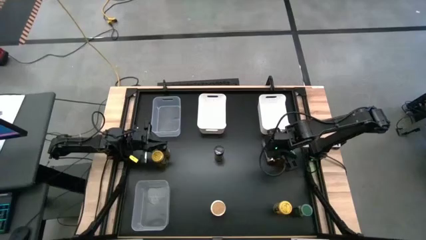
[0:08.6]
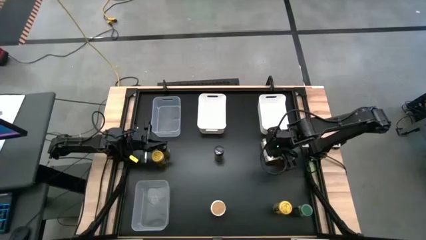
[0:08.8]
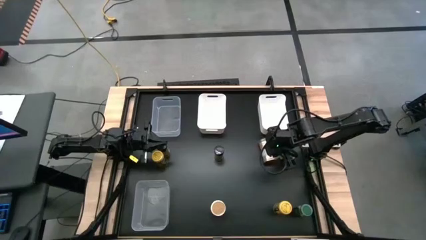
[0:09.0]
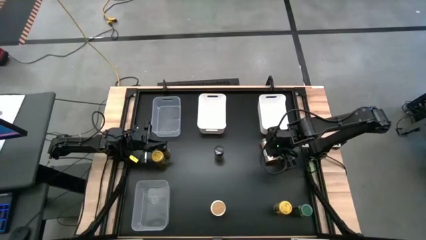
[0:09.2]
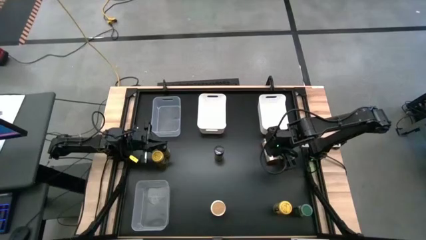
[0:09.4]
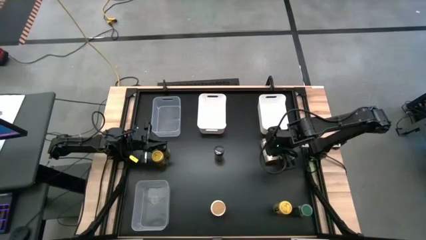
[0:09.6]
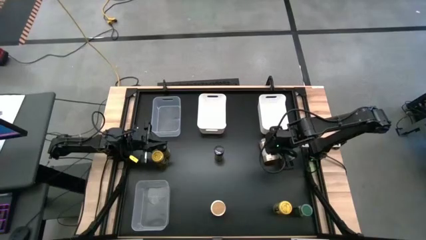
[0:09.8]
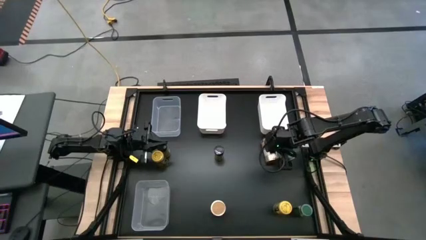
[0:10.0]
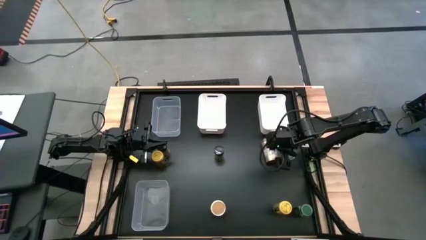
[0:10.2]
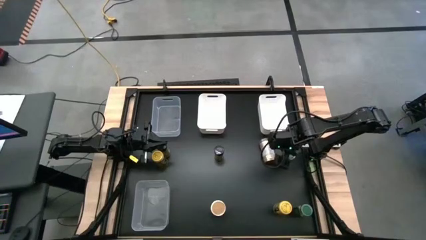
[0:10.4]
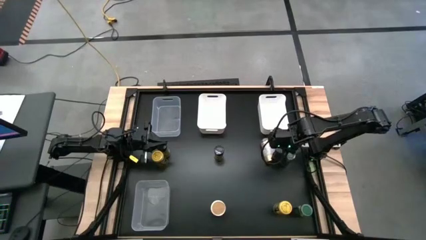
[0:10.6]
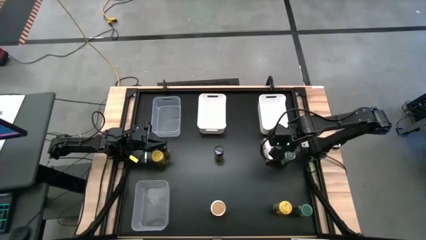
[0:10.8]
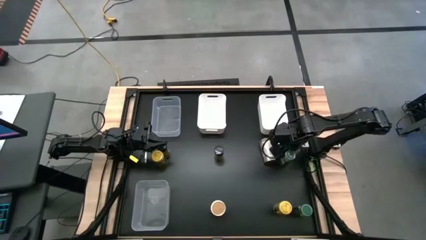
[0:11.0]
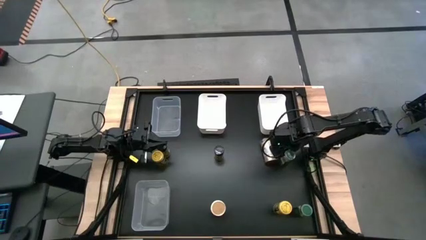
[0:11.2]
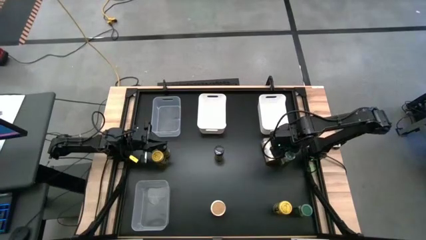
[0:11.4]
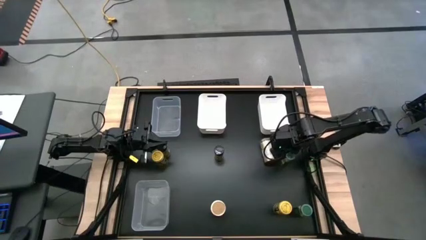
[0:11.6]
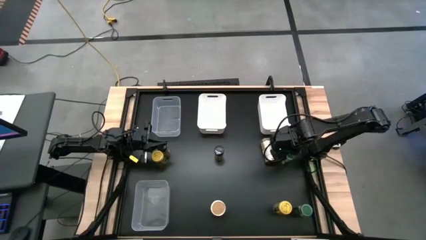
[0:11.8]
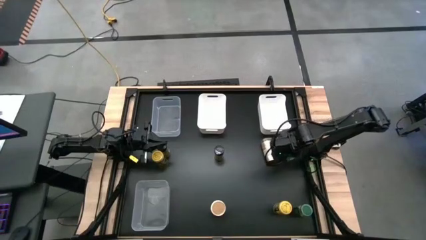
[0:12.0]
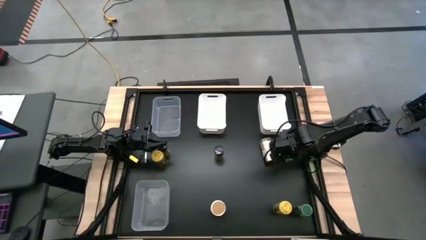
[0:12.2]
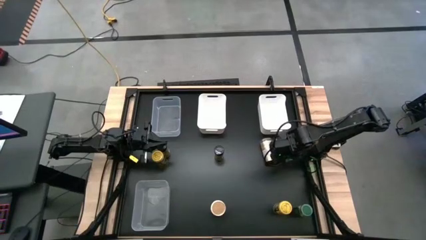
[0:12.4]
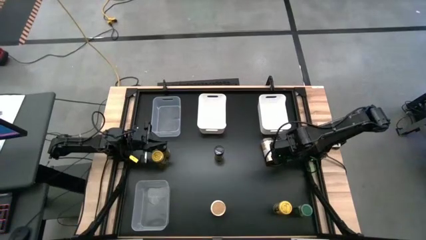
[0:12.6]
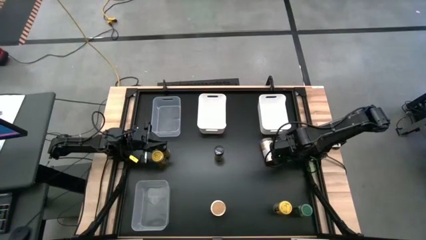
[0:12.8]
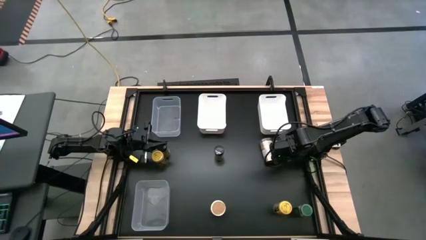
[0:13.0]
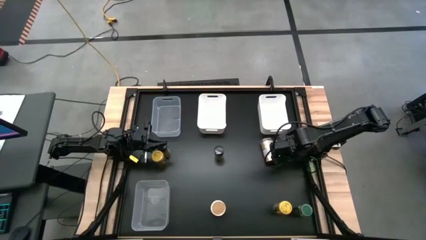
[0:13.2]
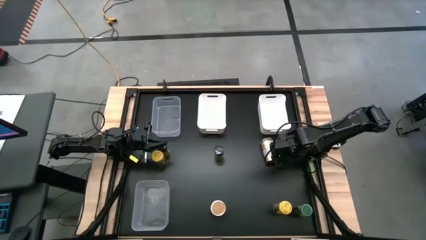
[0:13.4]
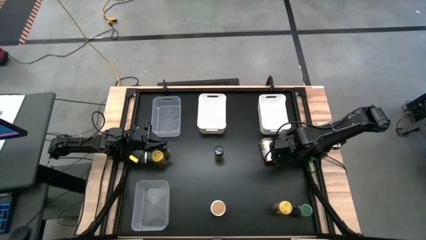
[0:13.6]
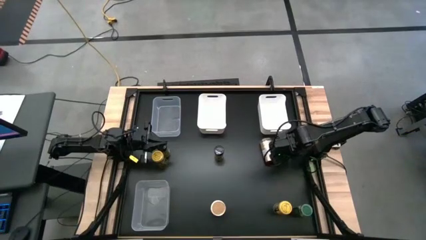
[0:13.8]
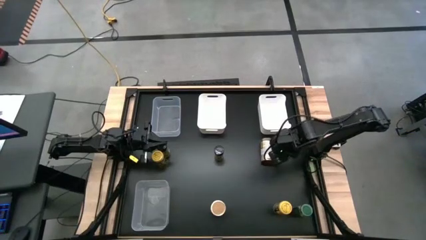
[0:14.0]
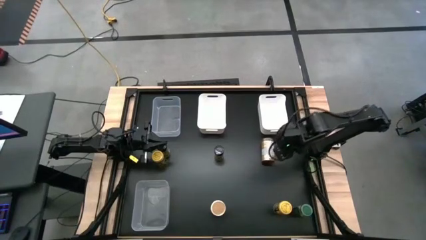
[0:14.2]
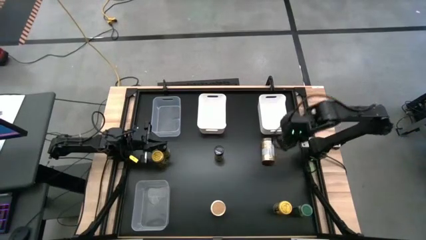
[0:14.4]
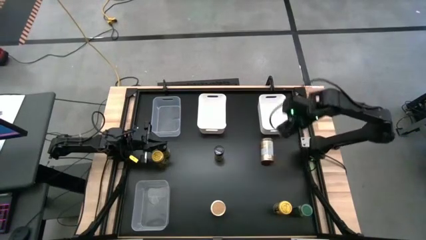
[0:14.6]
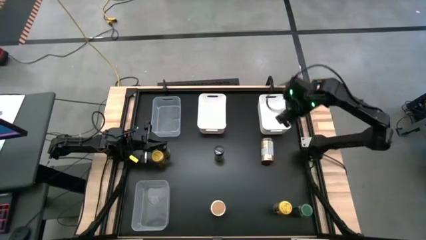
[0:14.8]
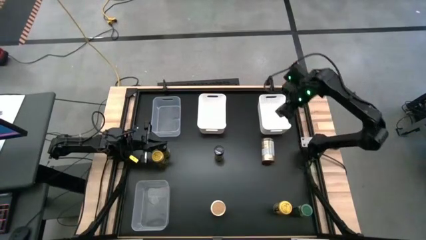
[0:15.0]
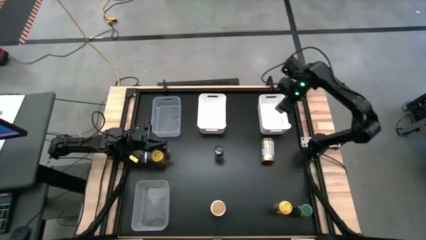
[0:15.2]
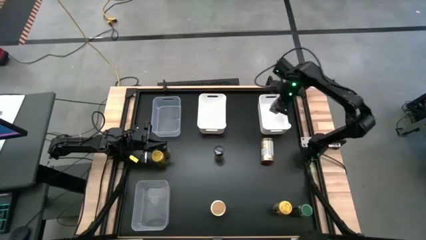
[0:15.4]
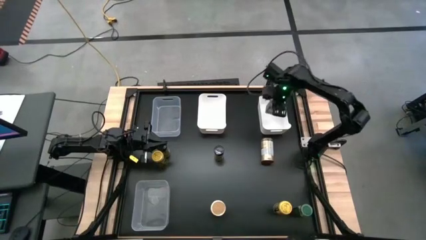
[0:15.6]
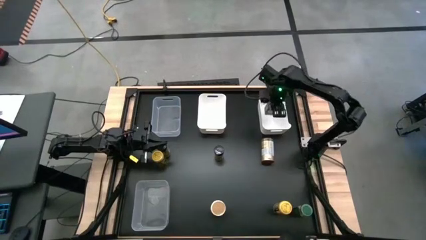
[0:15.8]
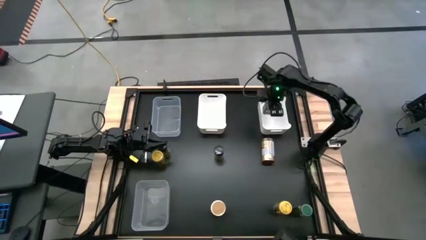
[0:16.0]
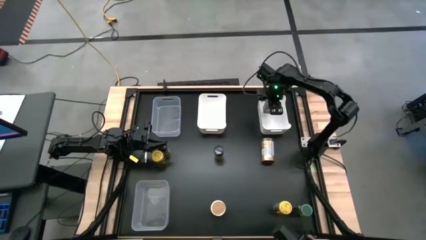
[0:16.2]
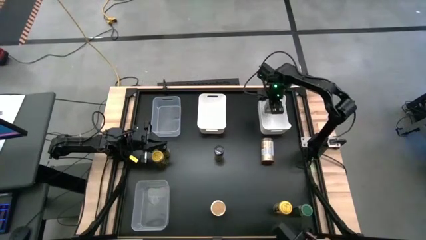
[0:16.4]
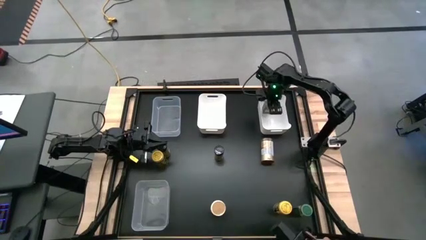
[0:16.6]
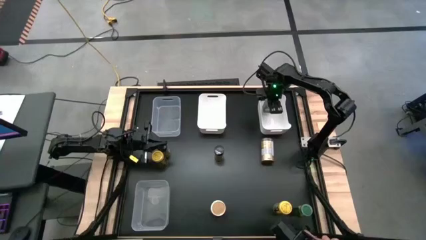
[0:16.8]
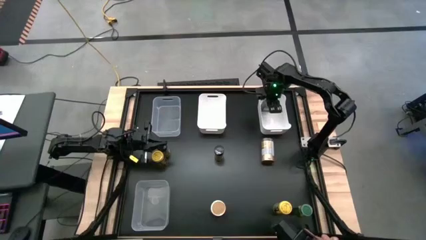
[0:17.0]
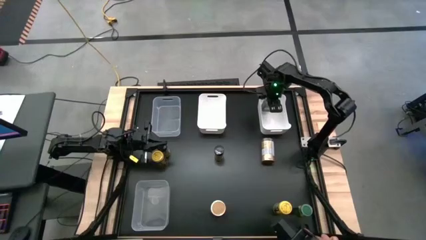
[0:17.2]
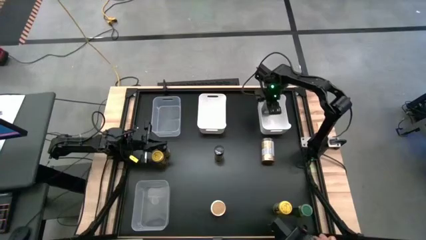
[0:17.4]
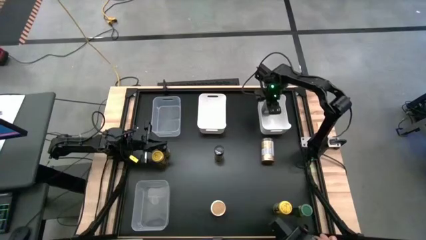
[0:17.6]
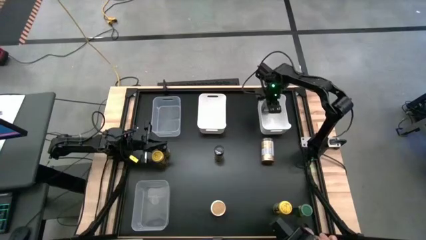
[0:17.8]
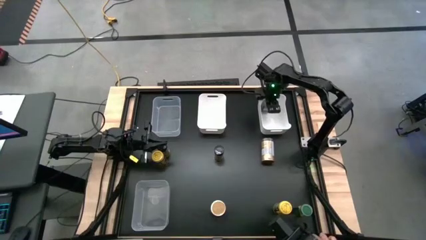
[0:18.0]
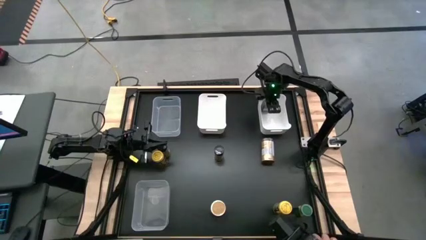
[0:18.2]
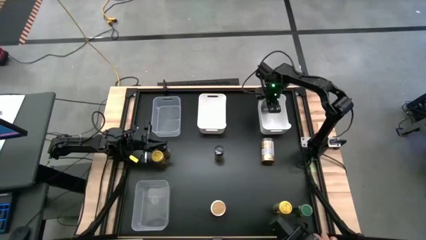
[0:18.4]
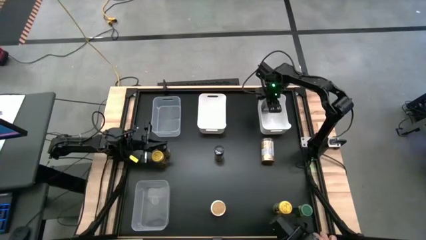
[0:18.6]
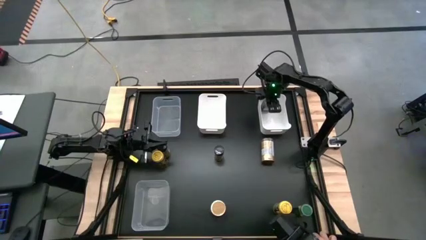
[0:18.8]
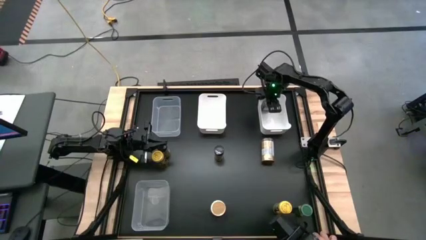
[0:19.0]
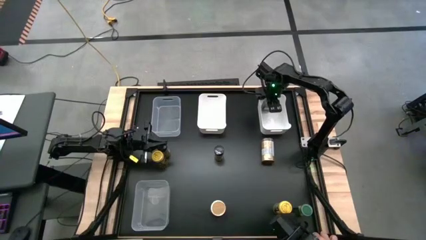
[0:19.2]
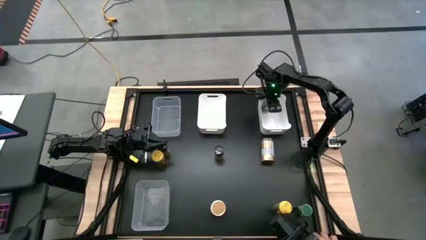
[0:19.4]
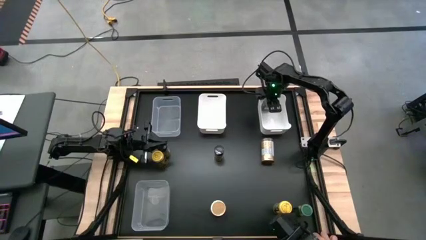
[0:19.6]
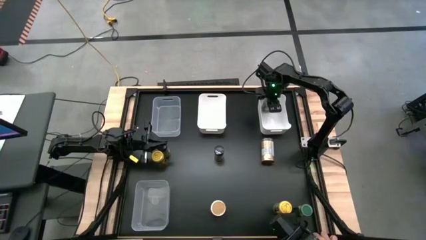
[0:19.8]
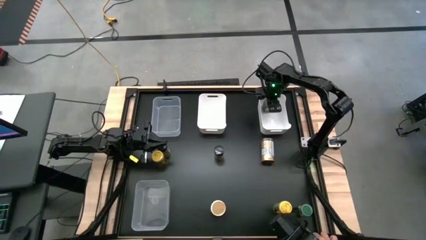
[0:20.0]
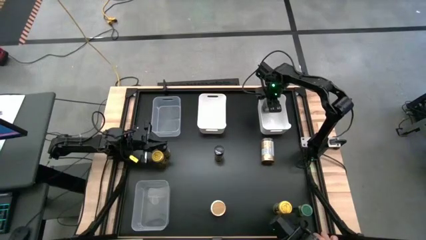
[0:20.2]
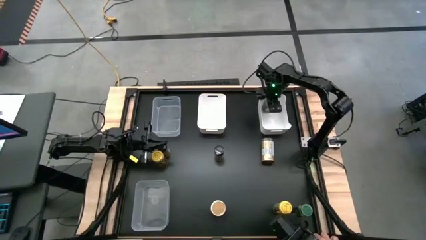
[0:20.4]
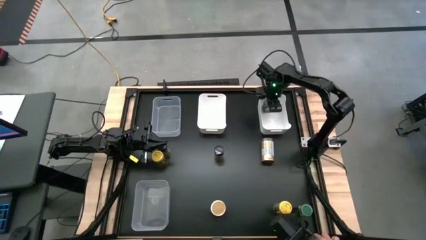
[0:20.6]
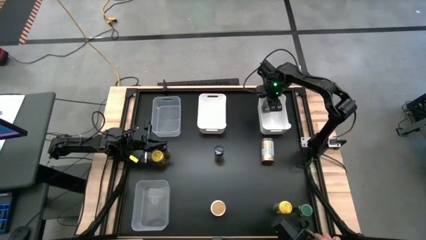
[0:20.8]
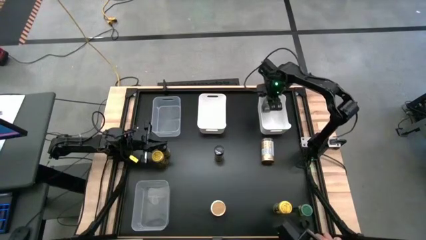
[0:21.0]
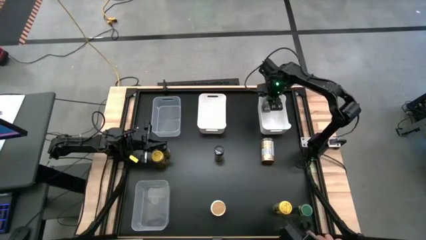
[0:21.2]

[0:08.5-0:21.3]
Task: Sort spices by type
Put the top green spice bottle into the right white bin
